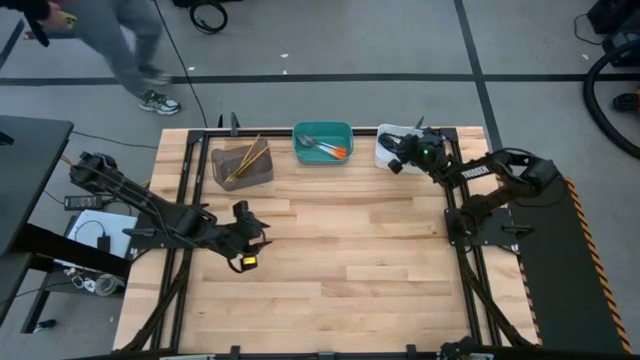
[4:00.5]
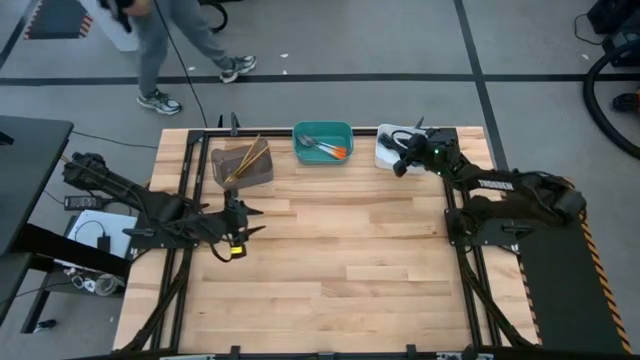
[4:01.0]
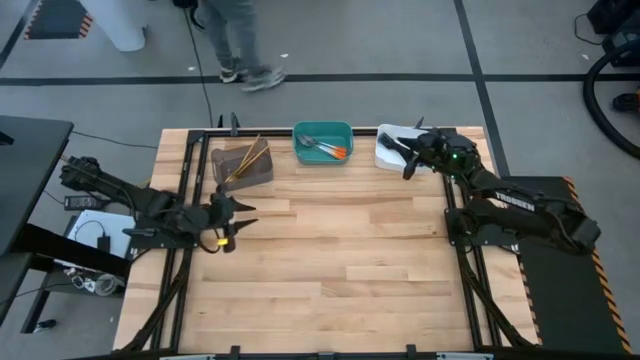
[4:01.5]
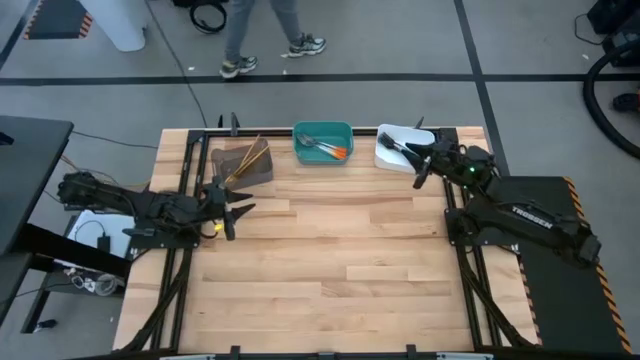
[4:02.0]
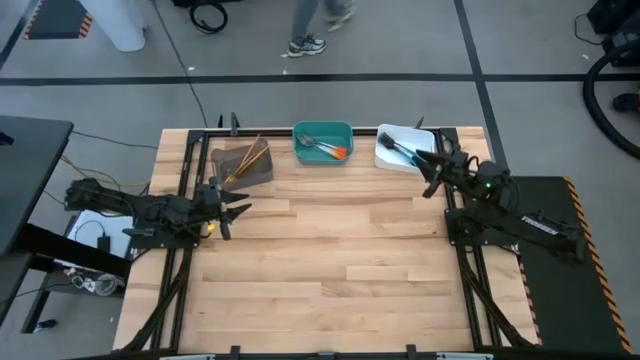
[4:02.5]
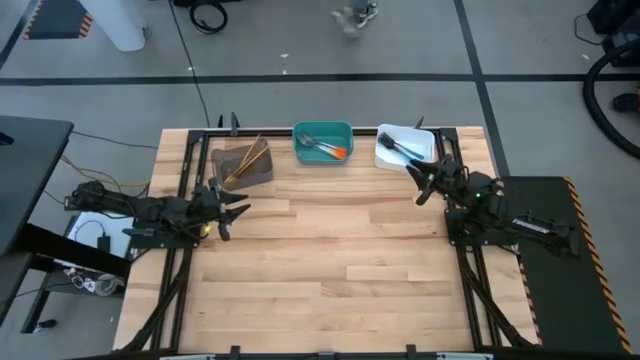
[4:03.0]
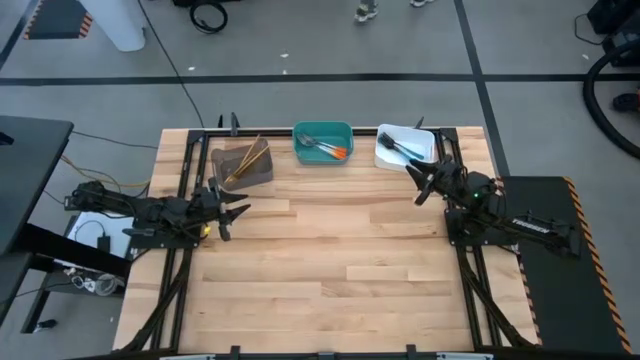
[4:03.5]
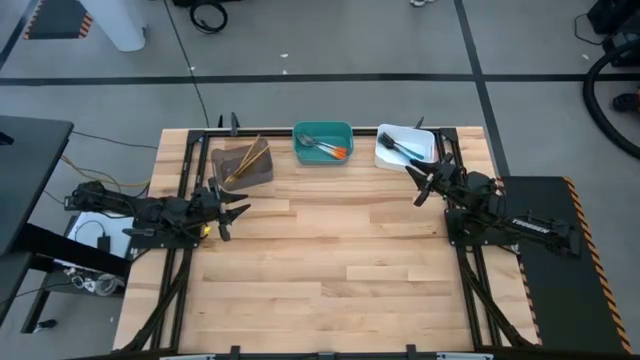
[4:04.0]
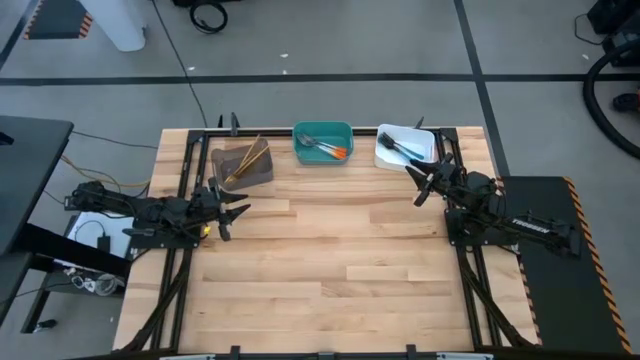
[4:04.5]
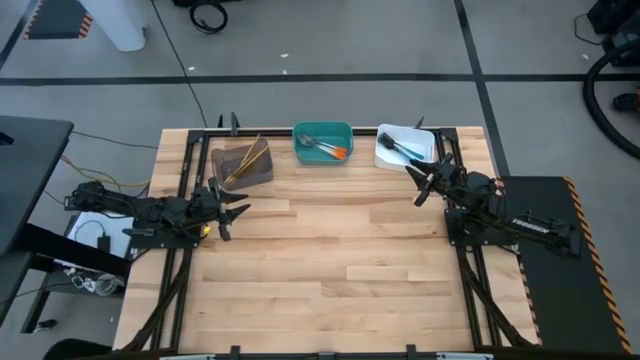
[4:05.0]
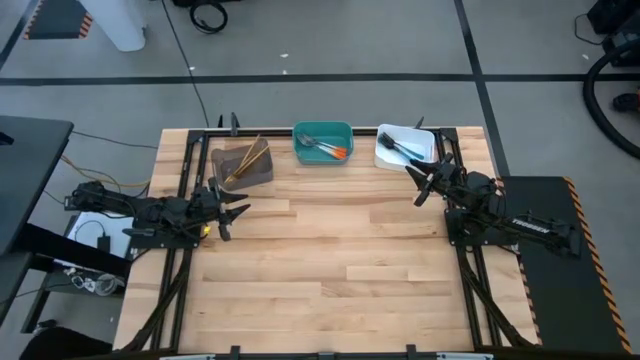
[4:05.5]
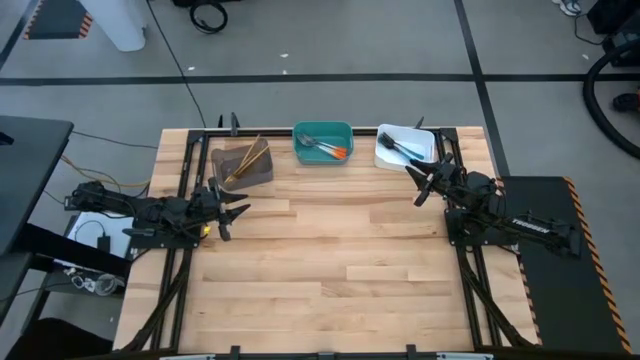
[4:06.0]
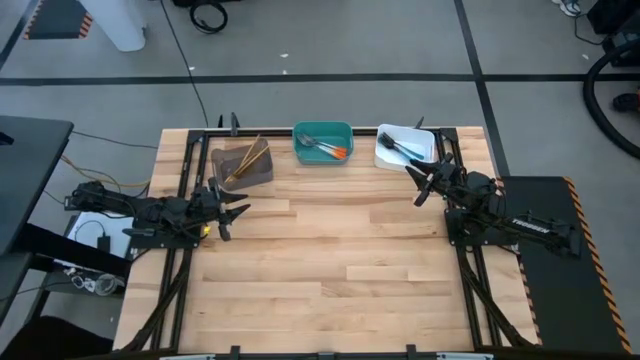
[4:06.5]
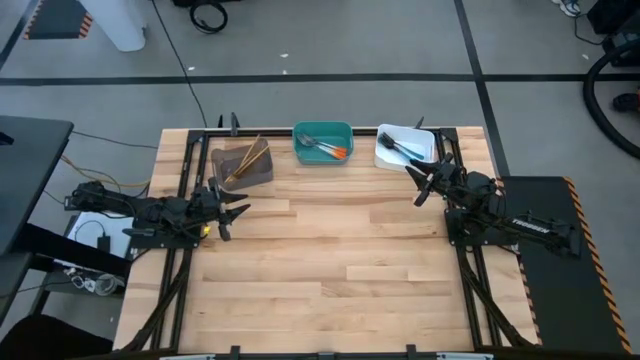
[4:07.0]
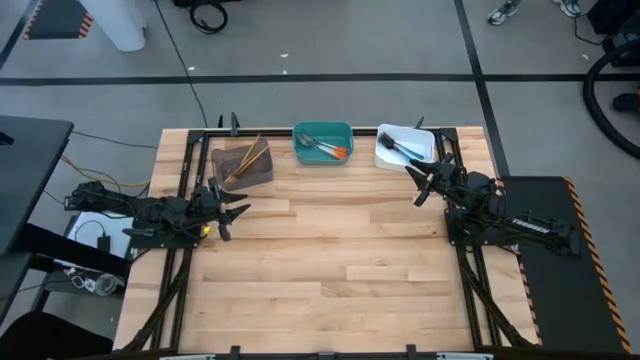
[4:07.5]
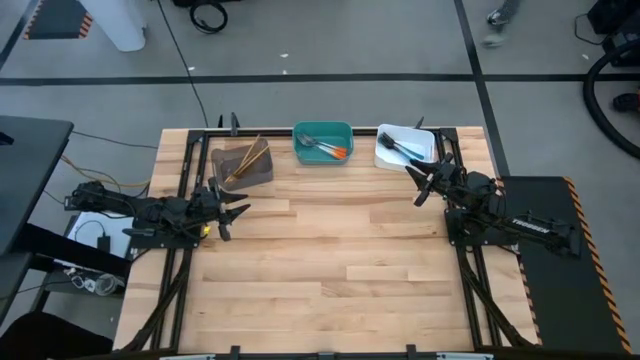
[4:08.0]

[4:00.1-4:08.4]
Task: Sort silverware by color (type)
Return to Home Position

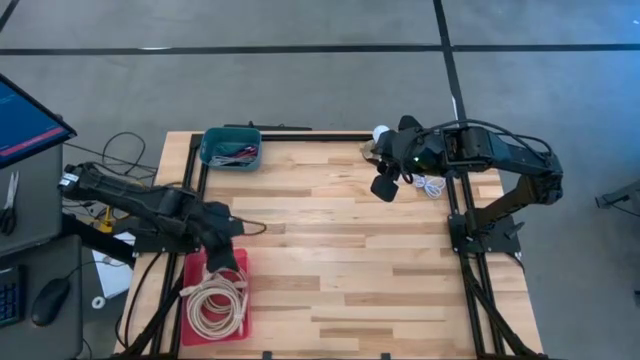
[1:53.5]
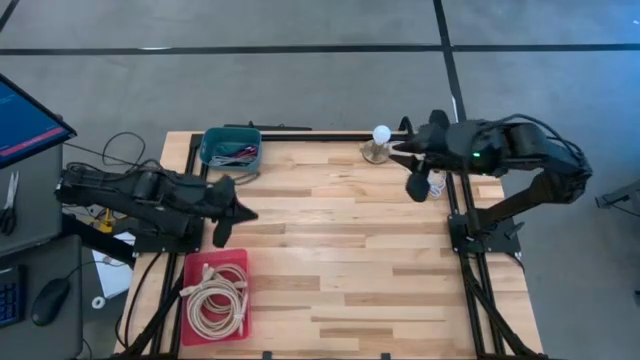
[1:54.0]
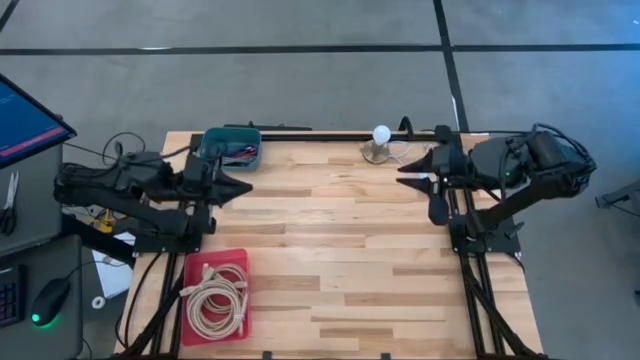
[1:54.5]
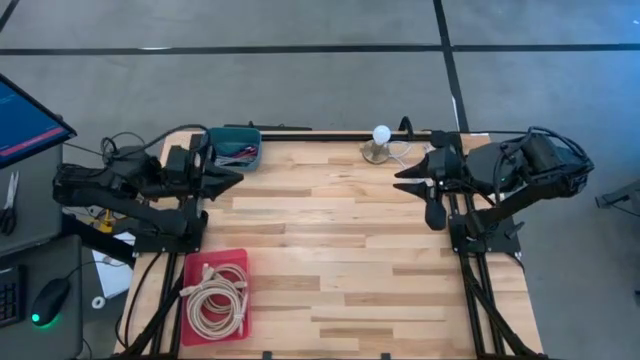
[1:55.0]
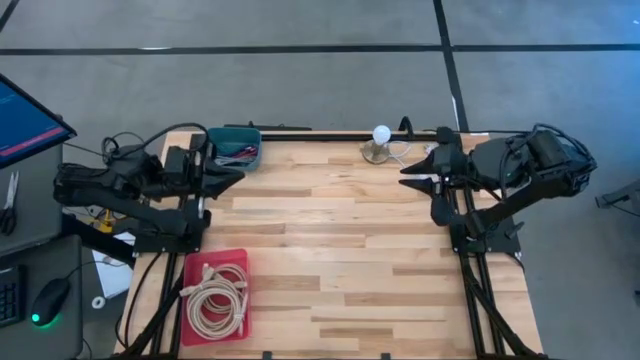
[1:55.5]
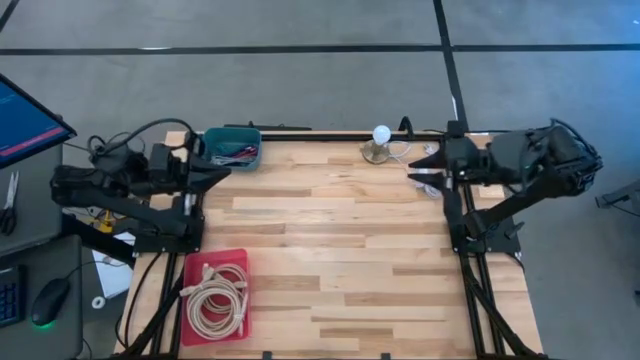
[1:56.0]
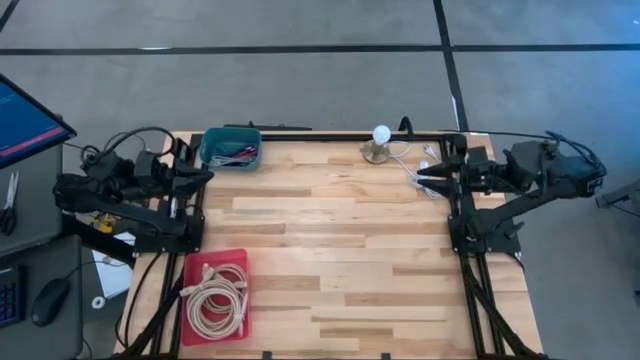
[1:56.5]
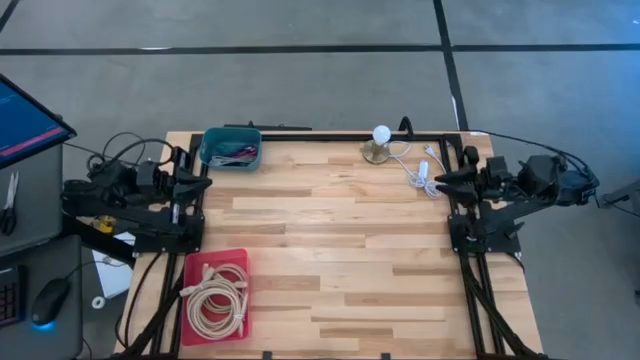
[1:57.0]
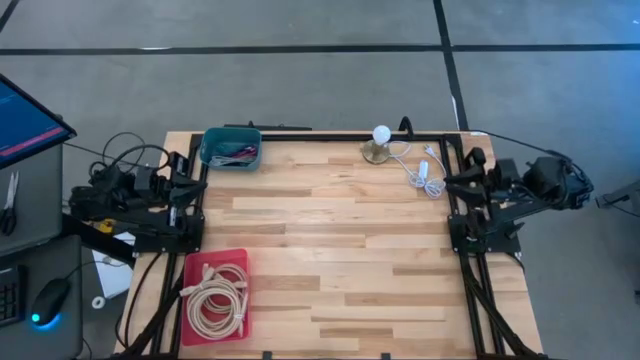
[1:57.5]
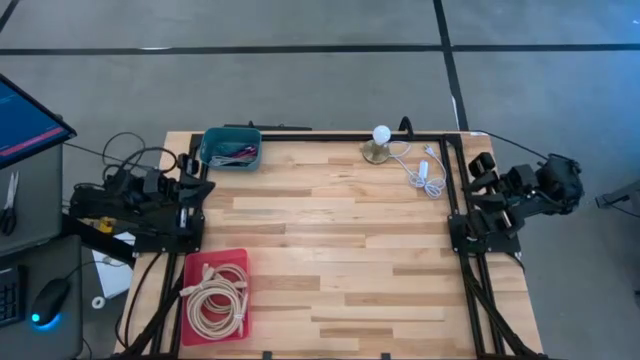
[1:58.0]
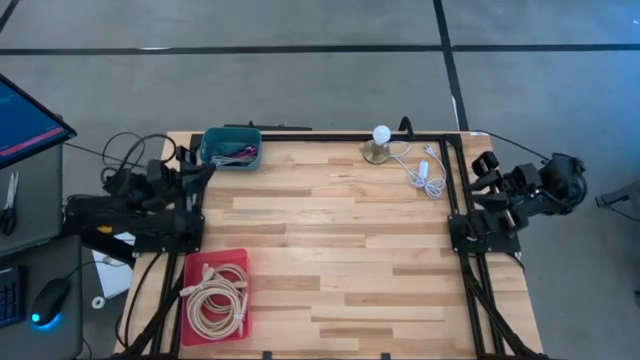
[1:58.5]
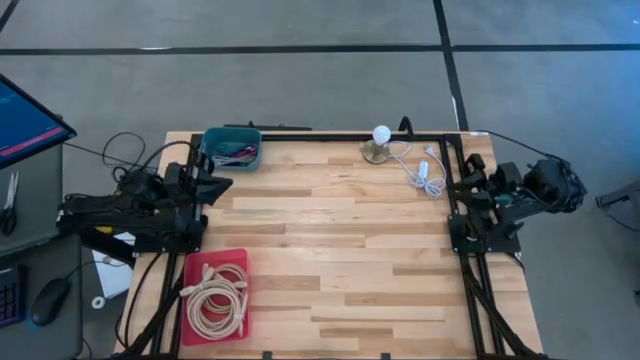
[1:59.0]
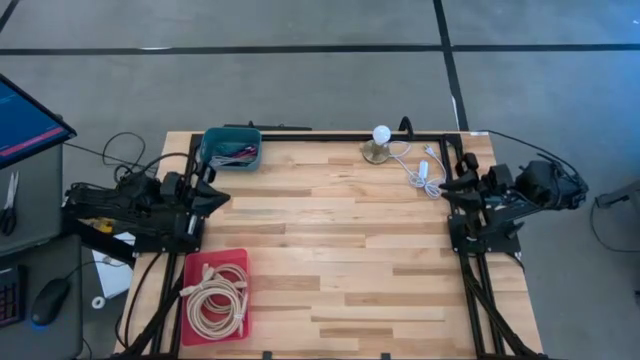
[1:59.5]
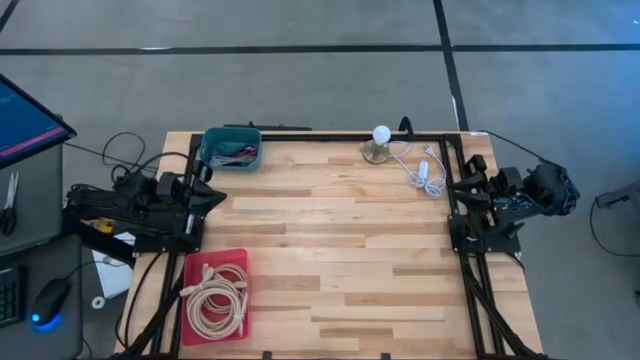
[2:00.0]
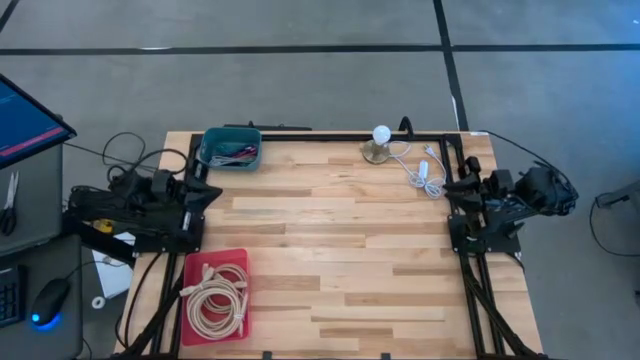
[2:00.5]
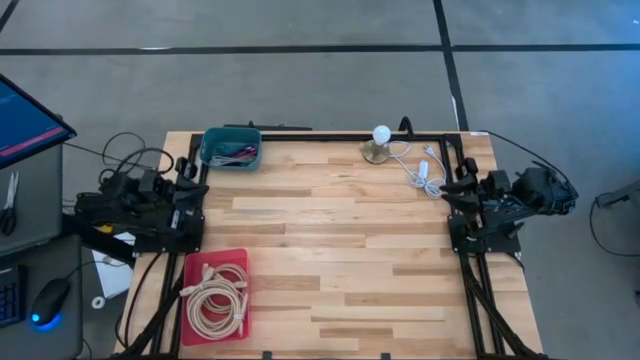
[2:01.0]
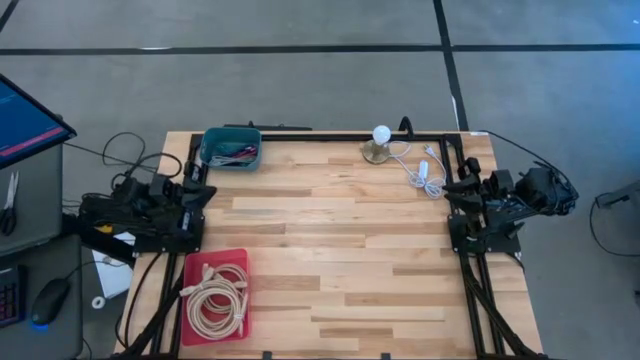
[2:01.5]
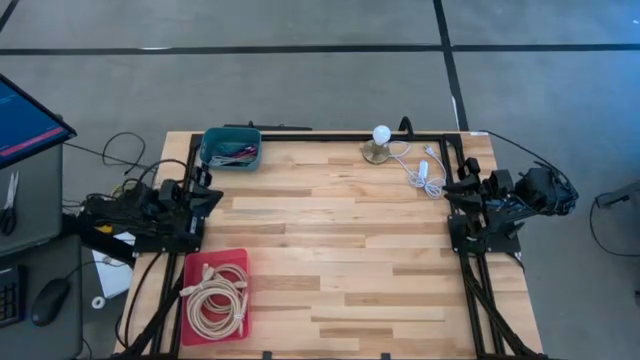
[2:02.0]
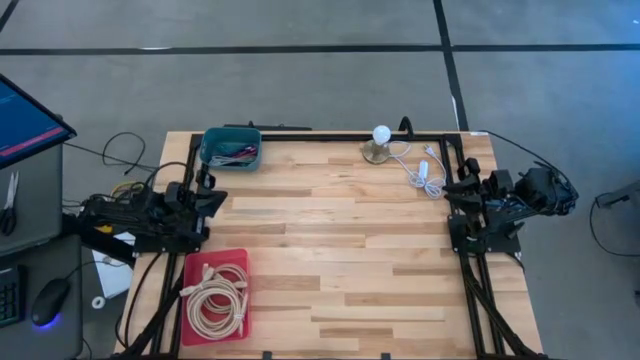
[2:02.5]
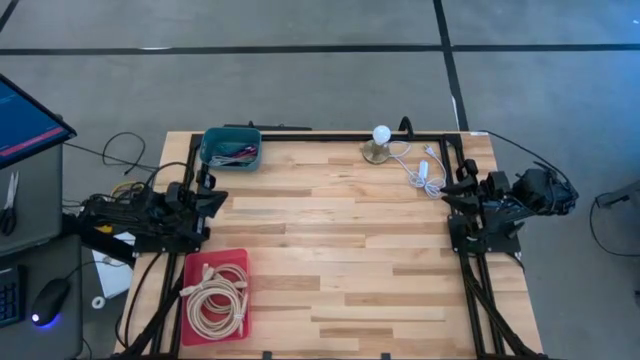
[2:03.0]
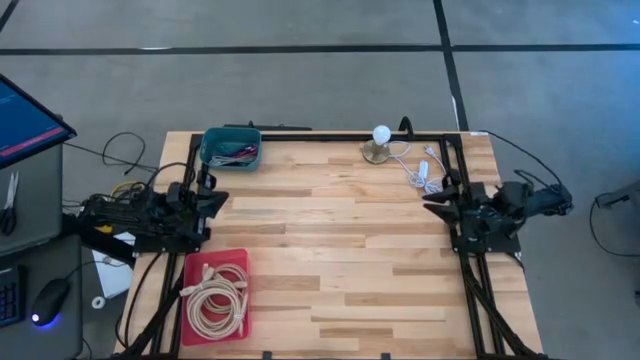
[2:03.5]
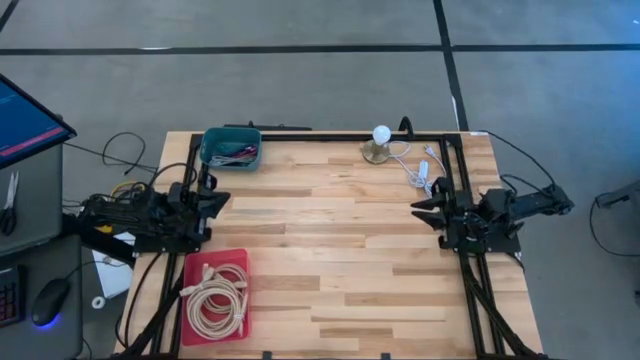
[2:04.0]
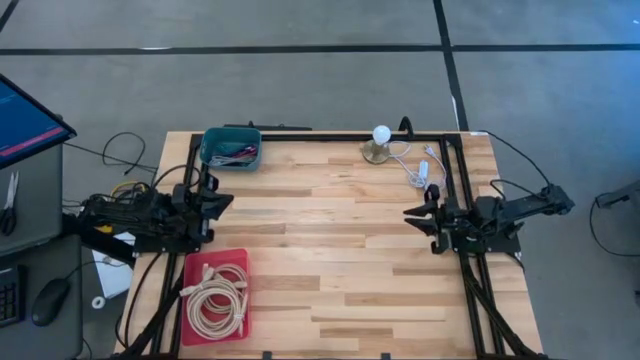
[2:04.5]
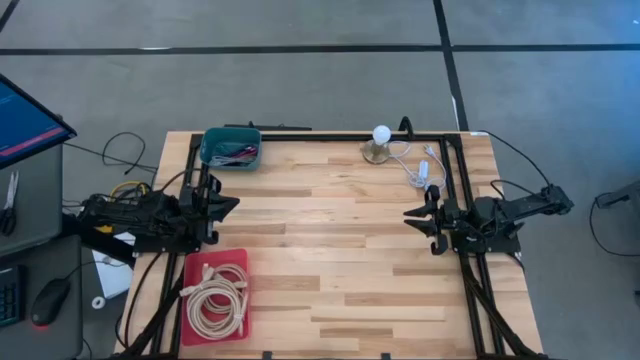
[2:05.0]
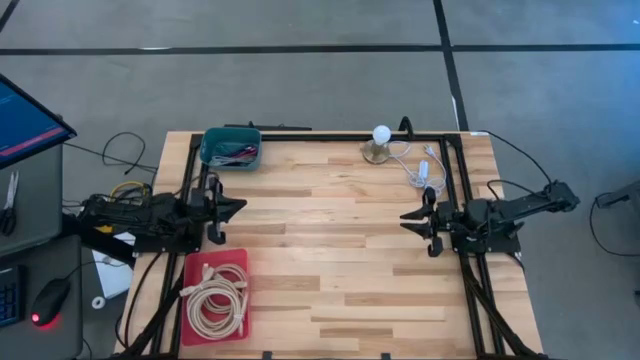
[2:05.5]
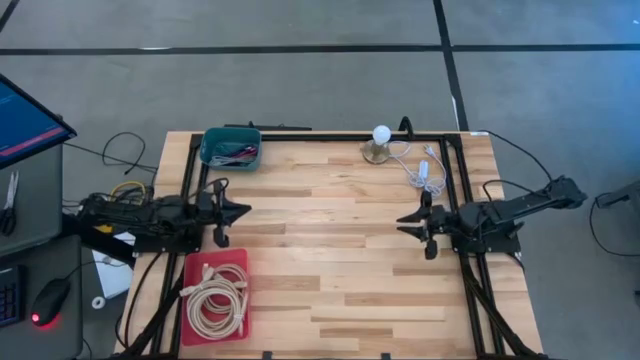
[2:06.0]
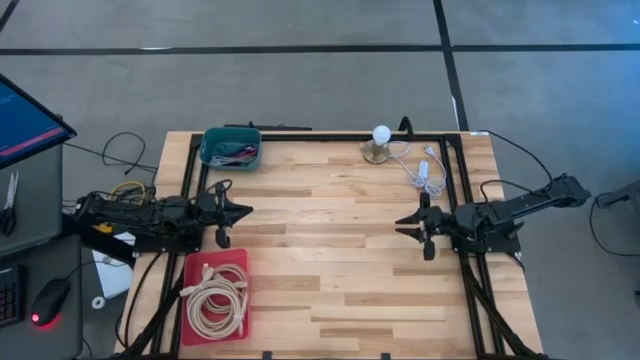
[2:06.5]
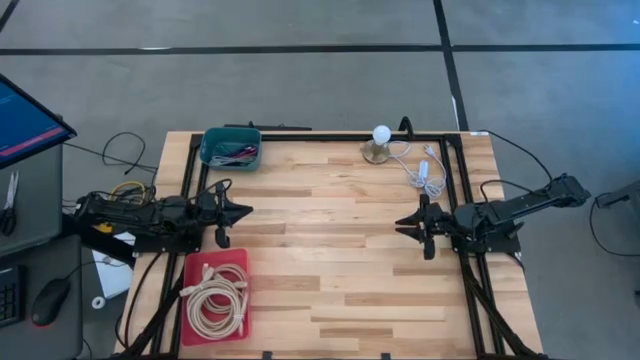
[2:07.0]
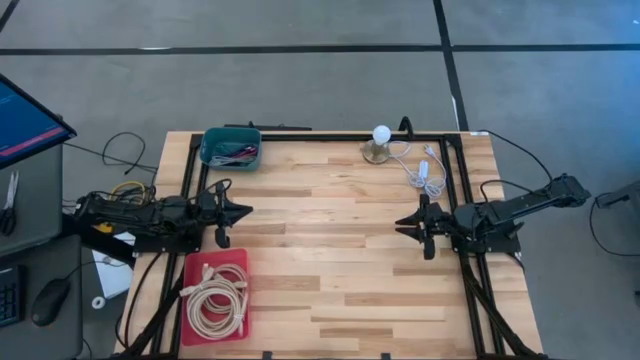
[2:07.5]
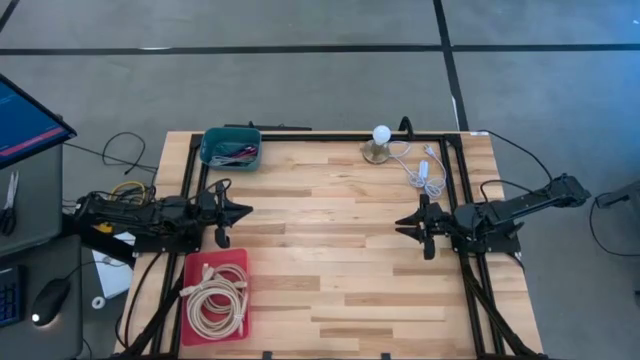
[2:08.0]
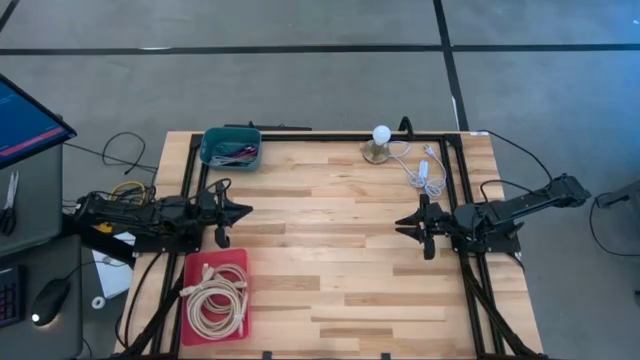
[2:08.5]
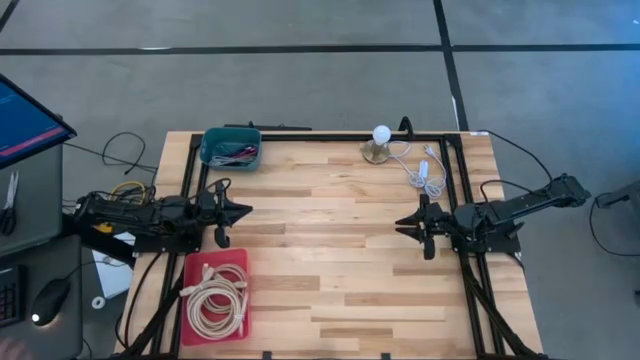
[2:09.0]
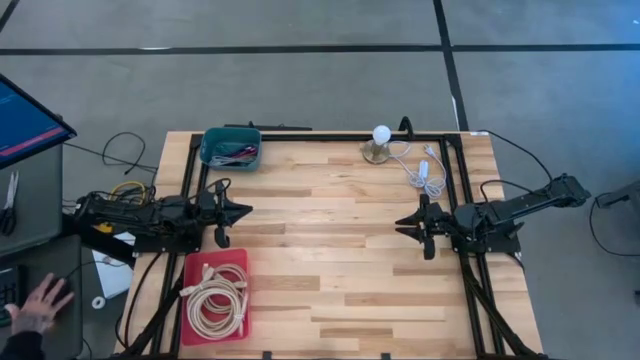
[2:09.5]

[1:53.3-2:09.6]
Task: Pick & Place USB Port
Return to Home Position
